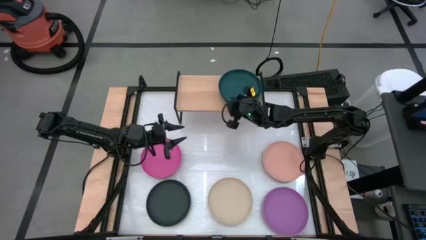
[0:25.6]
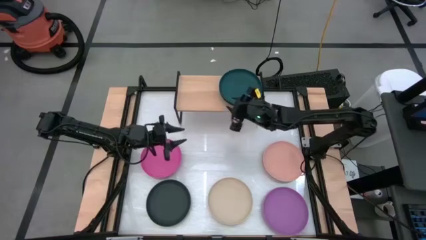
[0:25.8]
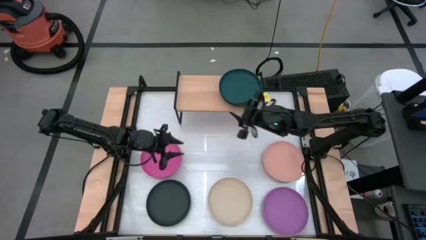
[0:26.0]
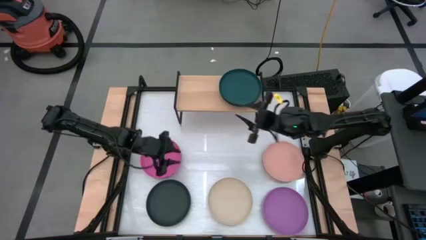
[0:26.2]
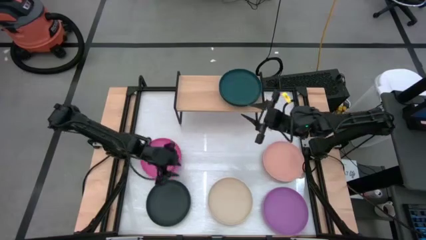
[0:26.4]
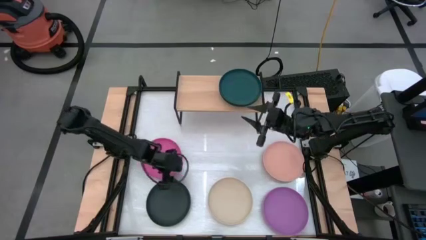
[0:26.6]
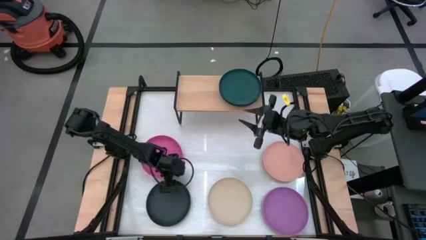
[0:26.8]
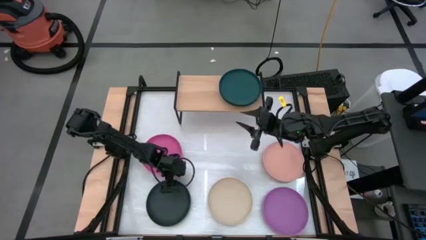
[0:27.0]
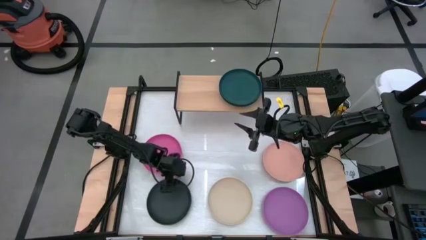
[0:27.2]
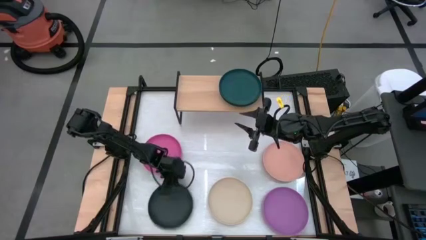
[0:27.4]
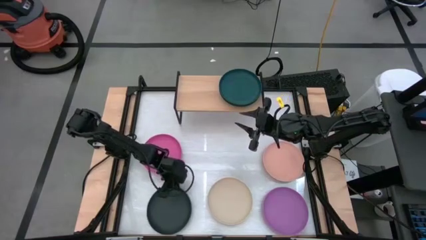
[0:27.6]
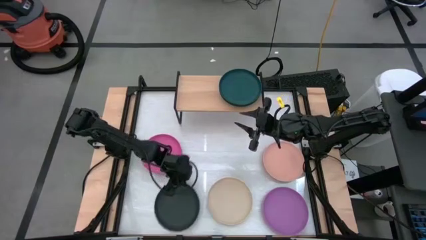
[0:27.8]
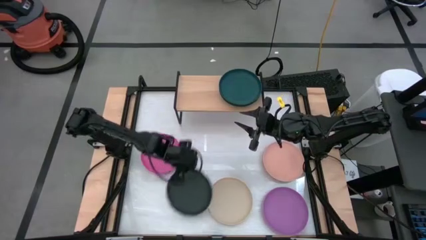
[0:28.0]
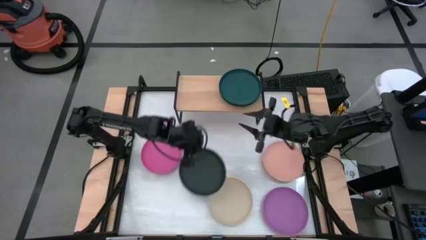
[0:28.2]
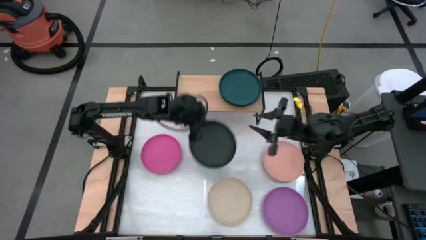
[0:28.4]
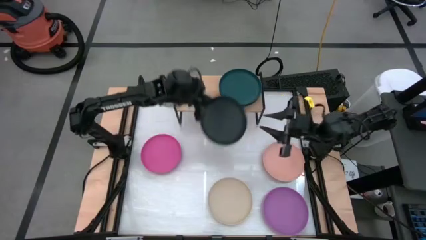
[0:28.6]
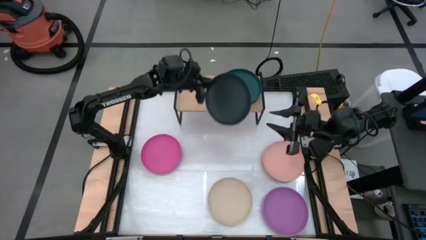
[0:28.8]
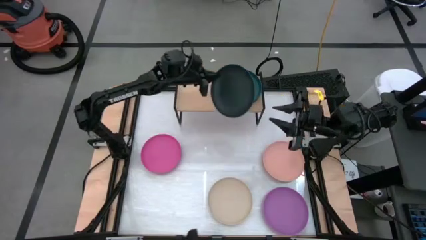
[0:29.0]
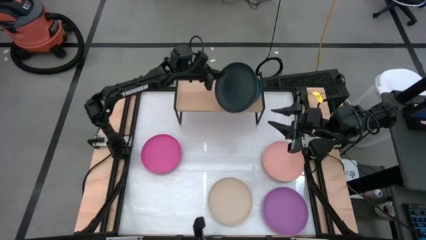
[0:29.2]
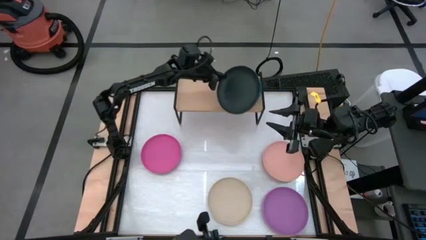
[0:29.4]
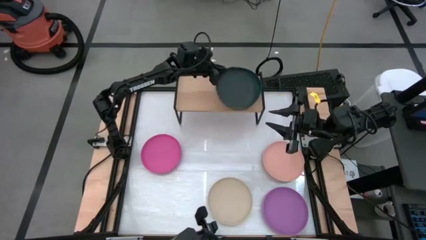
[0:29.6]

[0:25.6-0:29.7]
Task: Place and stack plates onto a shelf
Stack the black plate on the dark green plate on the shelf

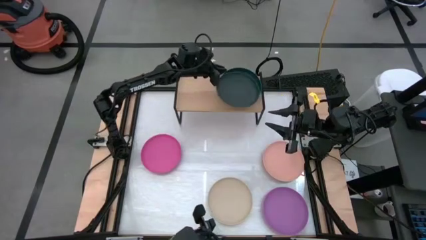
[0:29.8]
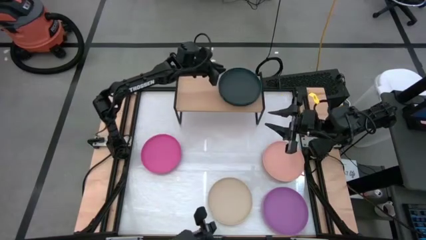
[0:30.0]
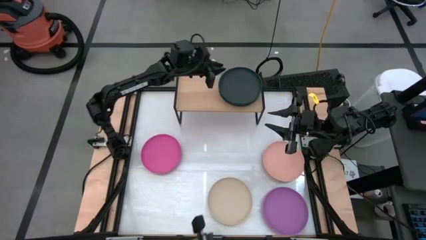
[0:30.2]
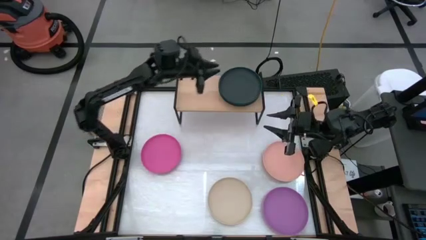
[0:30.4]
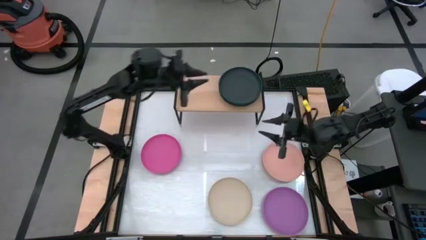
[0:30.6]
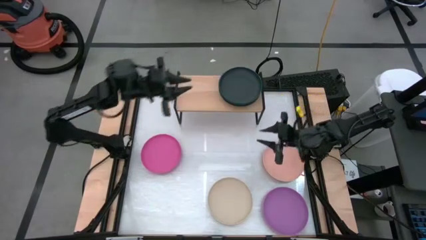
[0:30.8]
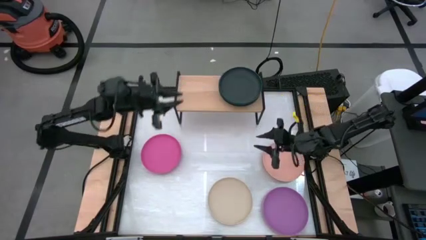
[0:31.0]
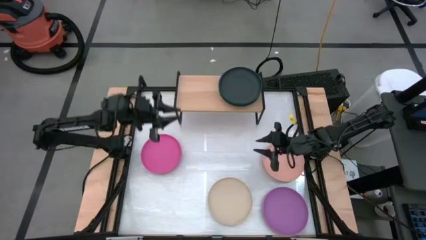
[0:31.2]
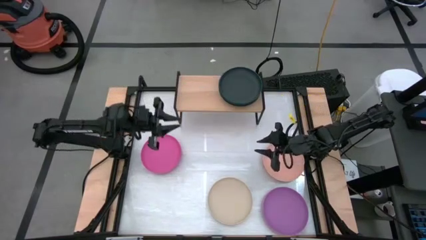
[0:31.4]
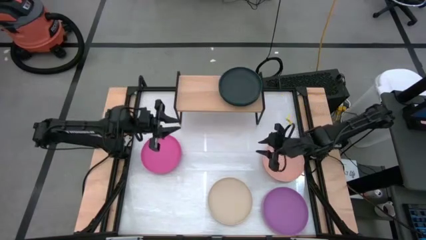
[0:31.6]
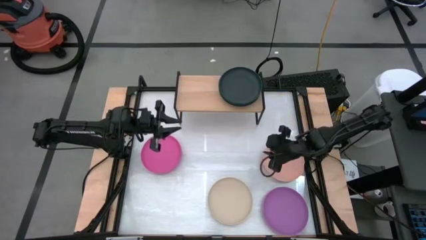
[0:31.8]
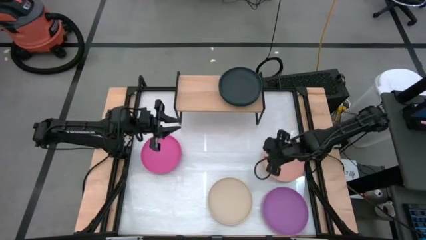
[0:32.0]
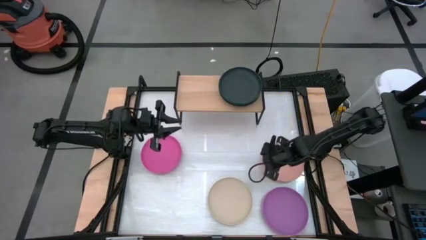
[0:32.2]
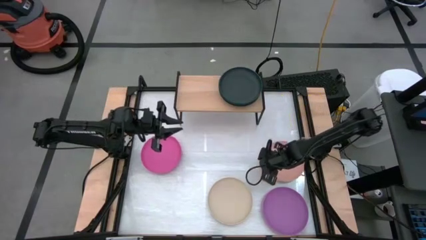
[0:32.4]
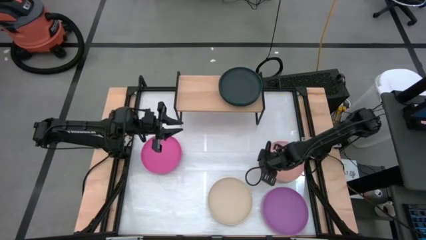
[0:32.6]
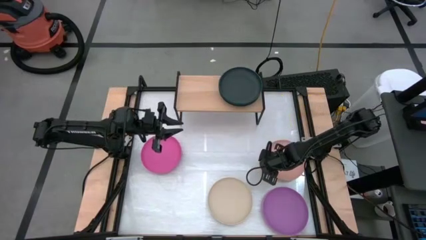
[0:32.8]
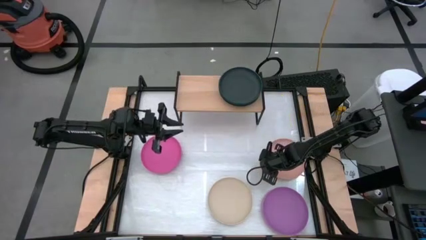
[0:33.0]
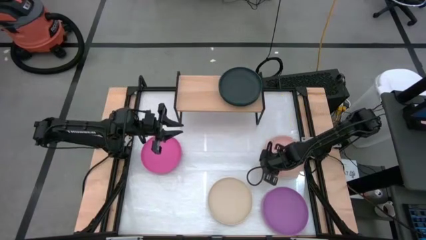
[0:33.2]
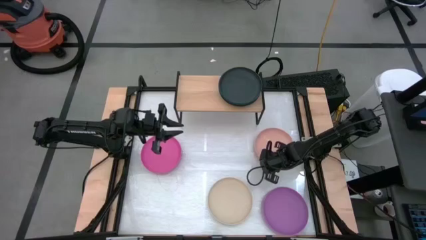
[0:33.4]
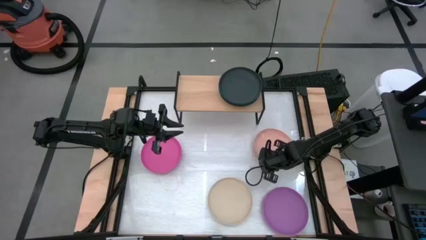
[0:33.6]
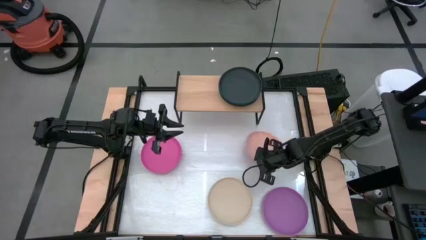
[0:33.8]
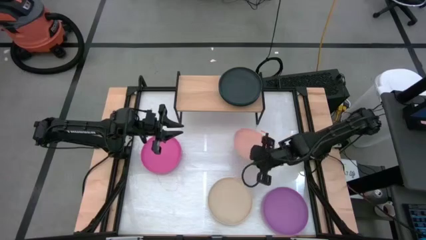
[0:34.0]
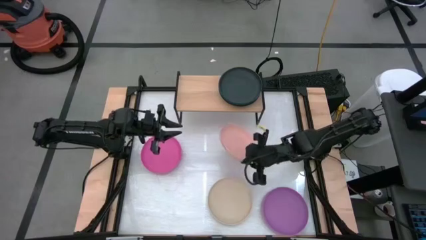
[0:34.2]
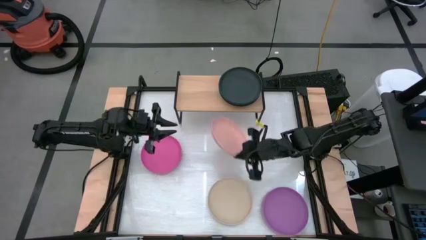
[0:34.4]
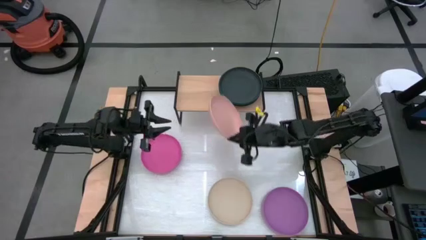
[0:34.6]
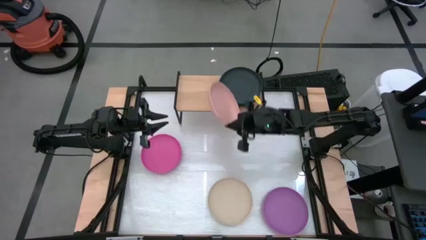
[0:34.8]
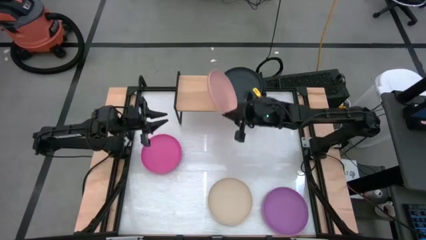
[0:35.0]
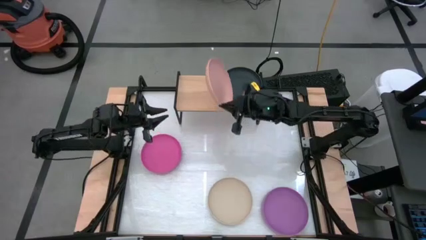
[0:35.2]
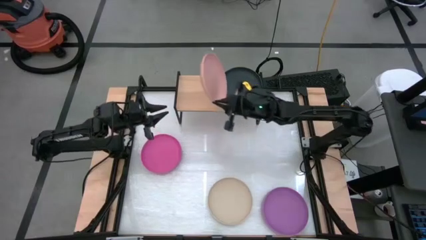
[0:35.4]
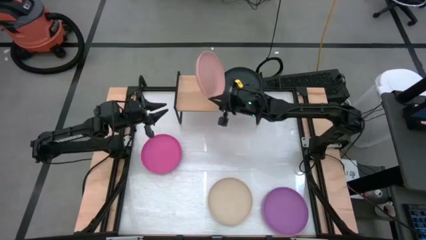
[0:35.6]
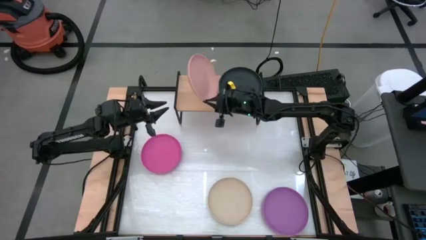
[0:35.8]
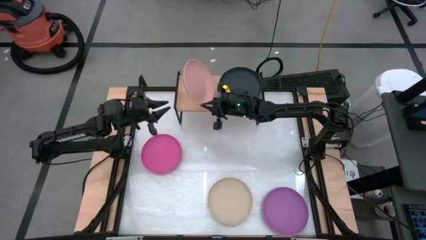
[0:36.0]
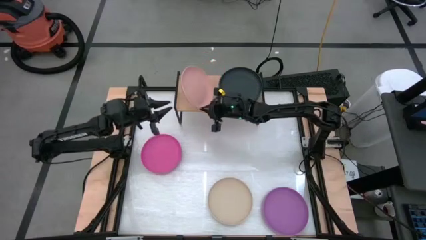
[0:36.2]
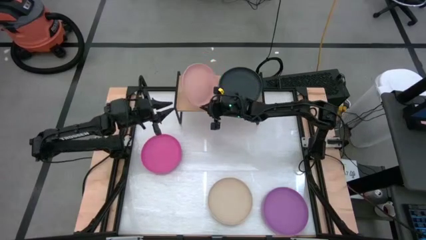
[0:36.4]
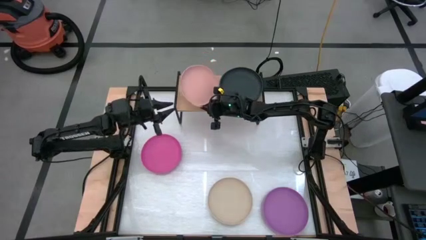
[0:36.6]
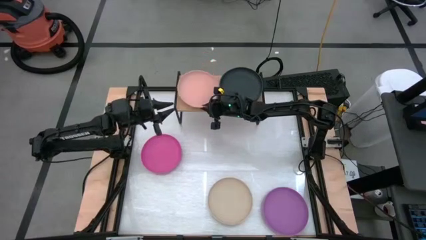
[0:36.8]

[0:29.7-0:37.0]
Put the light pink plate on the shelf

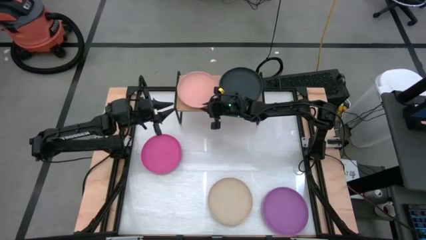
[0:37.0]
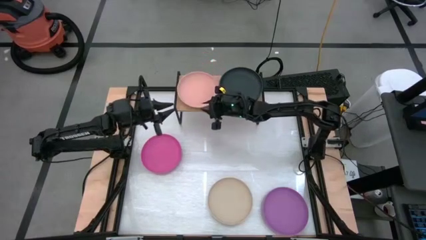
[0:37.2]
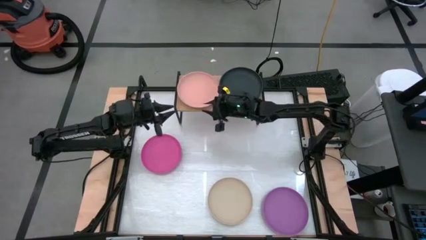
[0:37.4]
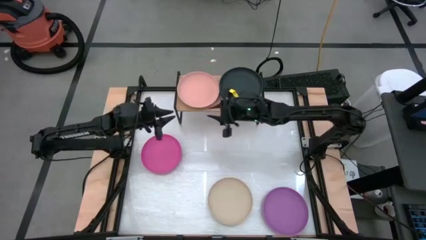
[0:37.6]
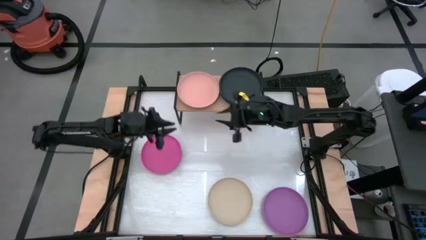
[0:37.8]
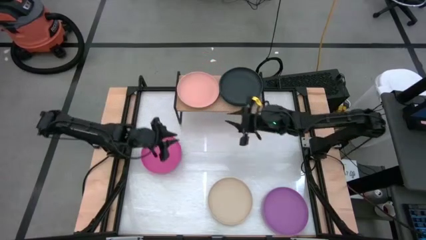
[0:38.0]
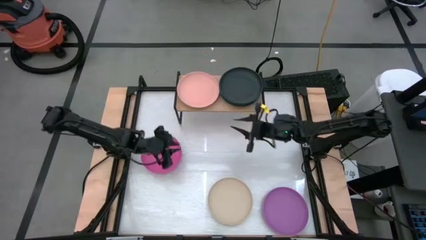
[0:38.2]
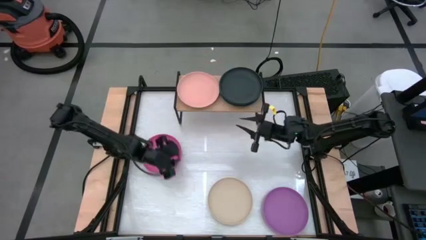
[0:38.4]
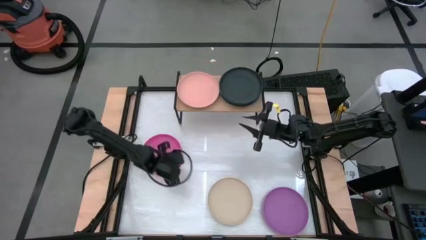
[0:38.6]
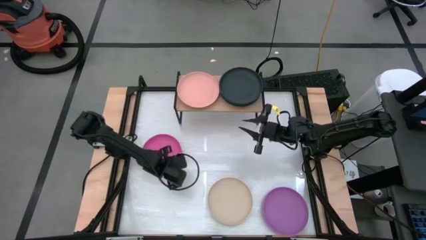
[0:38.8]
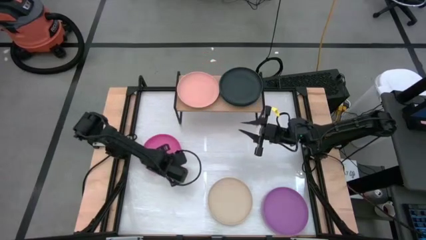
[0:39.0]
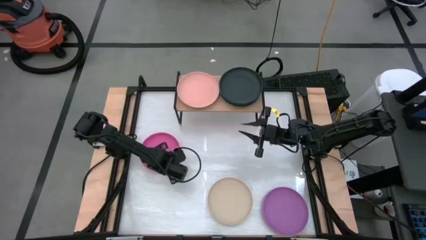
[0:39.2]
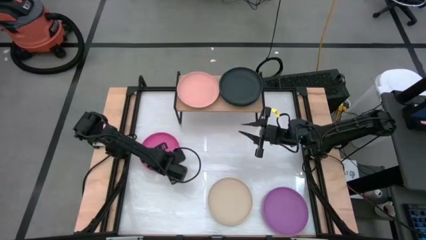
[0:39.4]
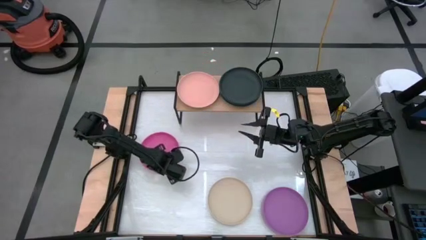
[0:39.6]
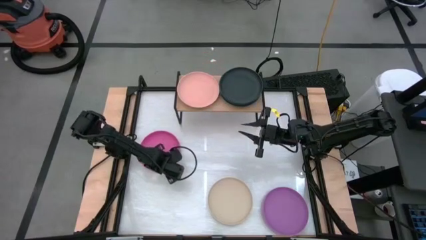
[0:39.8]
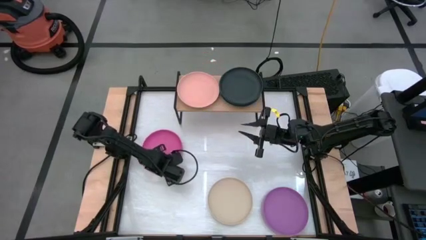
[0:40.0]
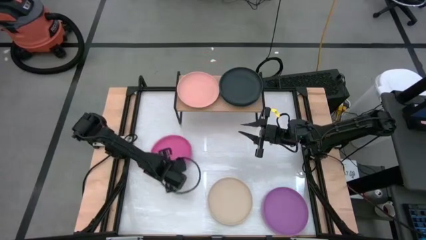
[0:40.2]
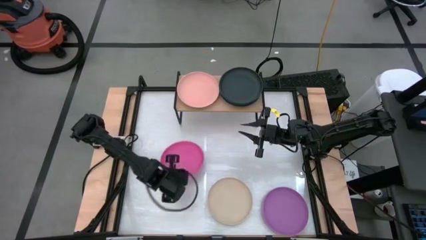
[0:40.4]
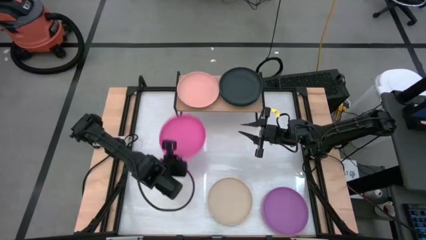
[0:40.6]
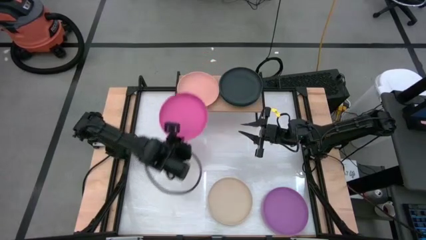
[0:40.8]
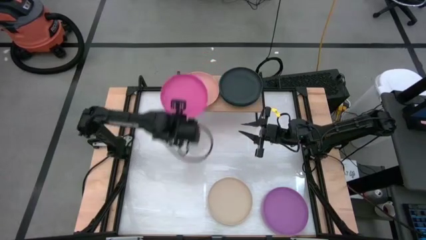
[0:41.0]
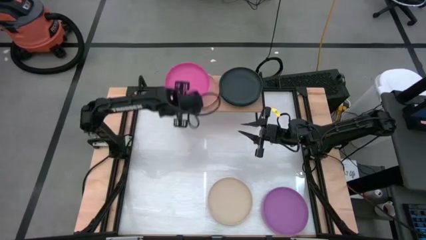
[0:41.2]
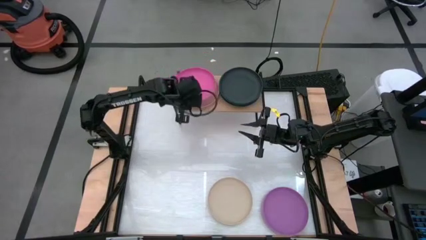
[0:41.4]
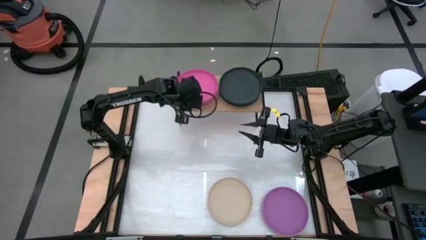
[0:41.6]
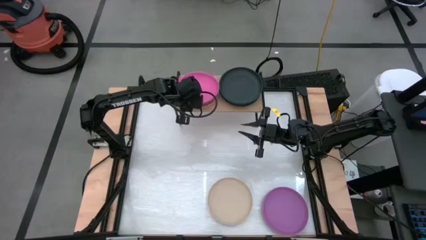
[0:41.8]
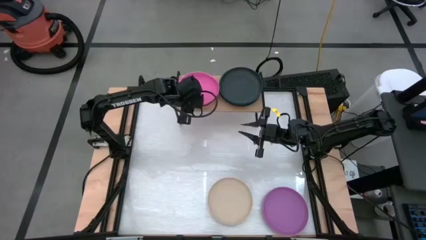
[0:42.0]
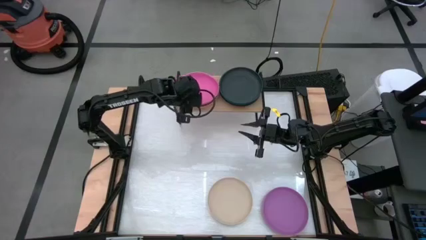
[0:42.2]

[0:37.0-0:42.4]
Stack the pink plate on the light pink plate on the shelf
